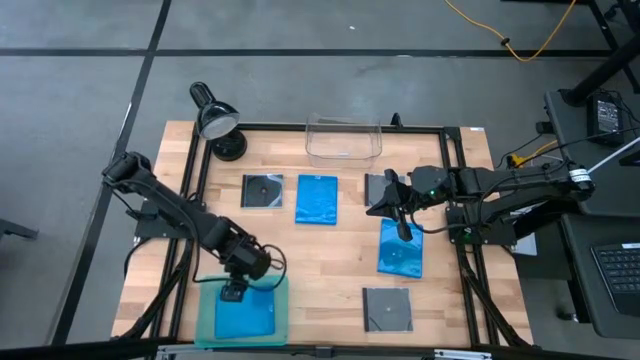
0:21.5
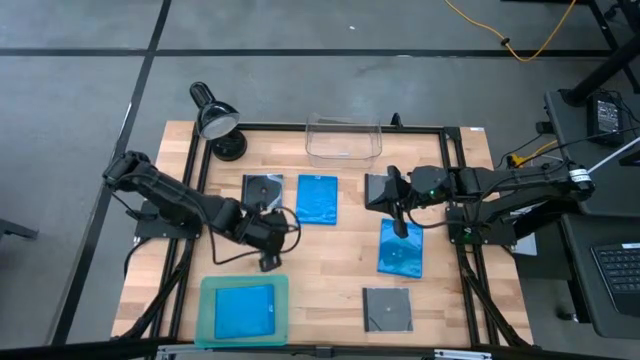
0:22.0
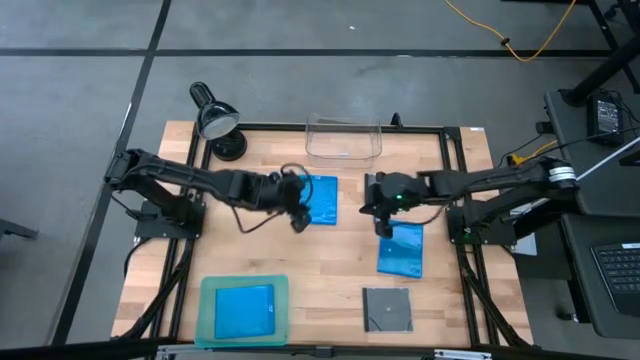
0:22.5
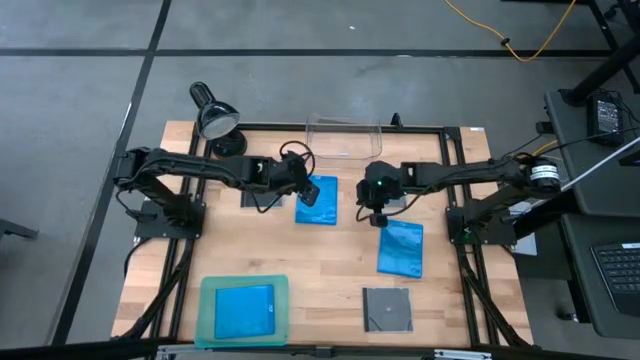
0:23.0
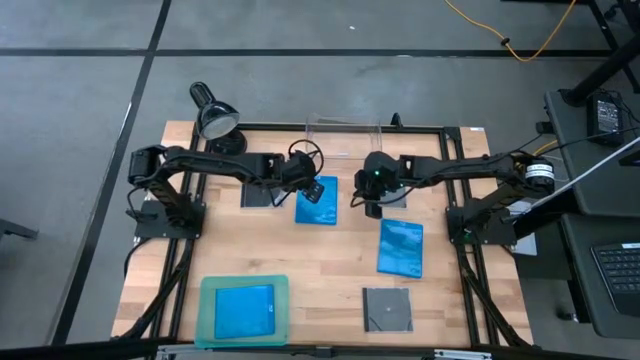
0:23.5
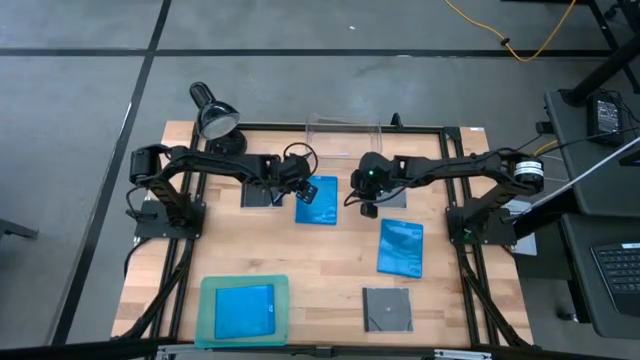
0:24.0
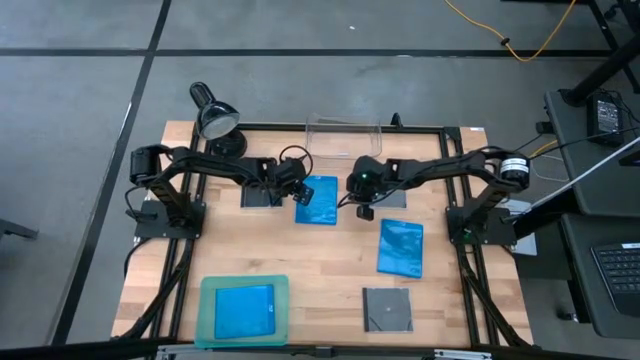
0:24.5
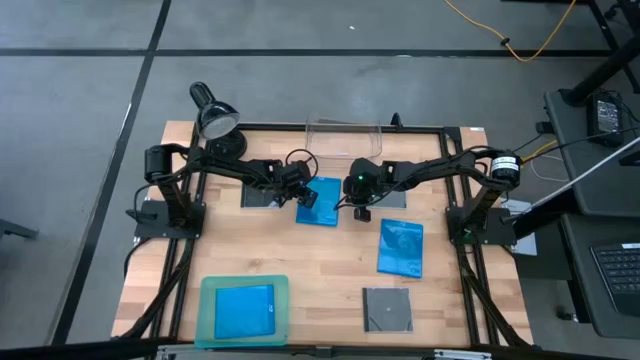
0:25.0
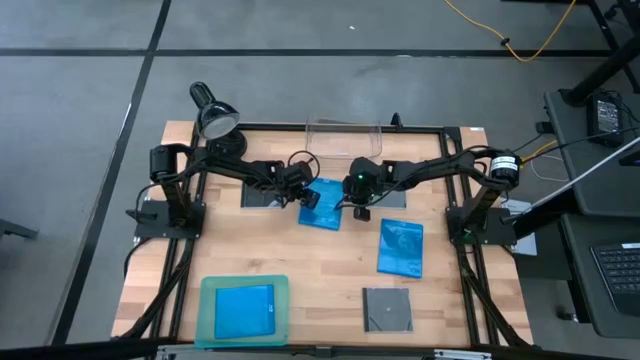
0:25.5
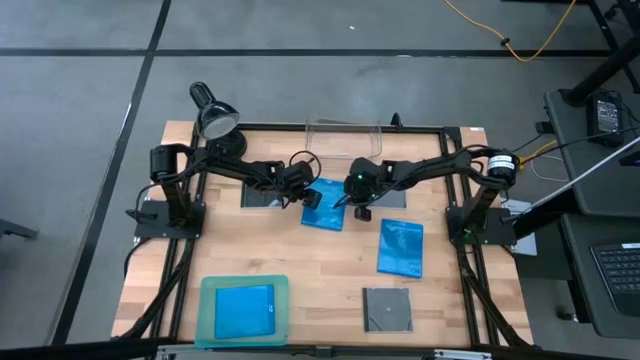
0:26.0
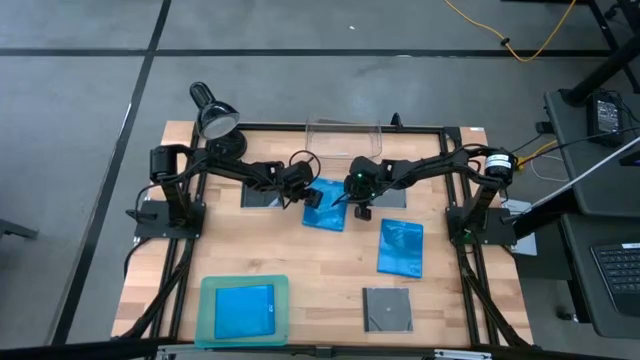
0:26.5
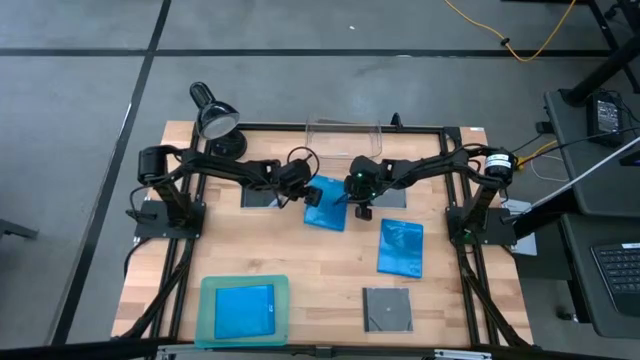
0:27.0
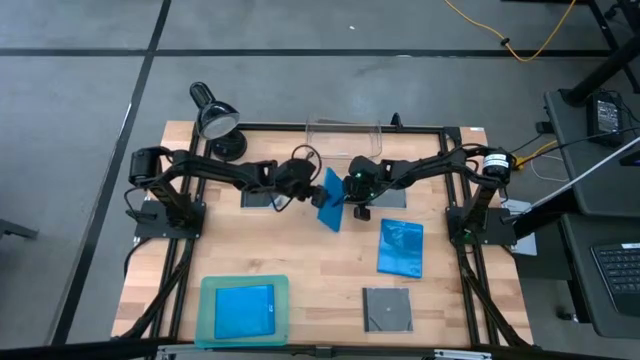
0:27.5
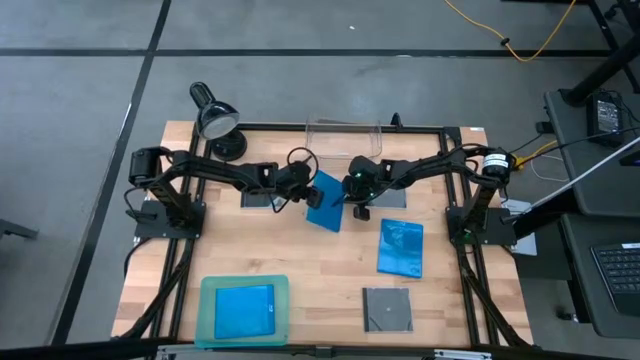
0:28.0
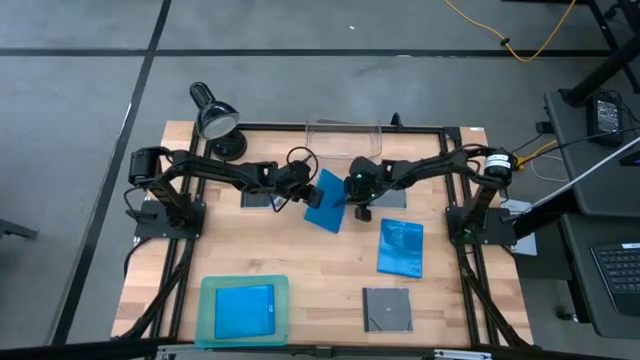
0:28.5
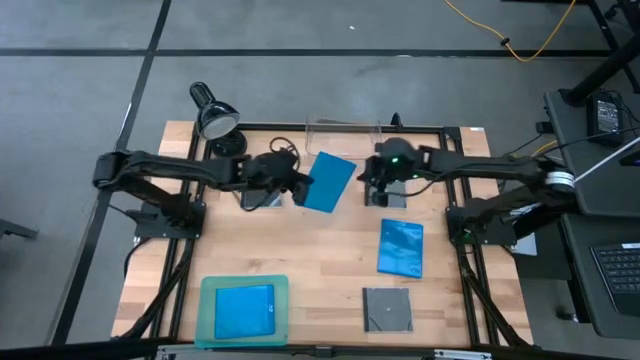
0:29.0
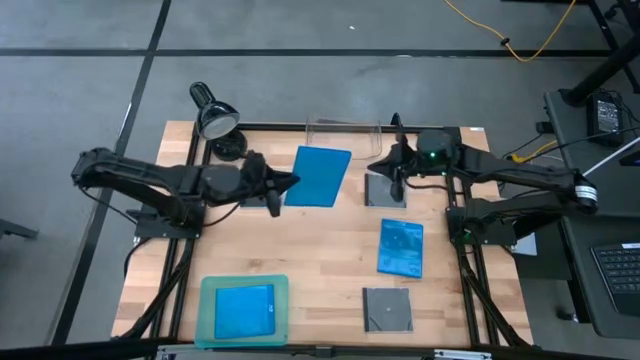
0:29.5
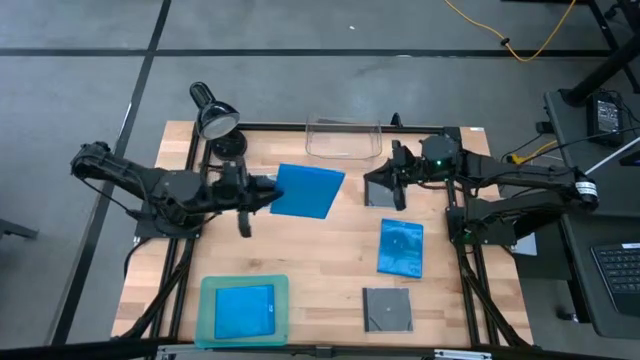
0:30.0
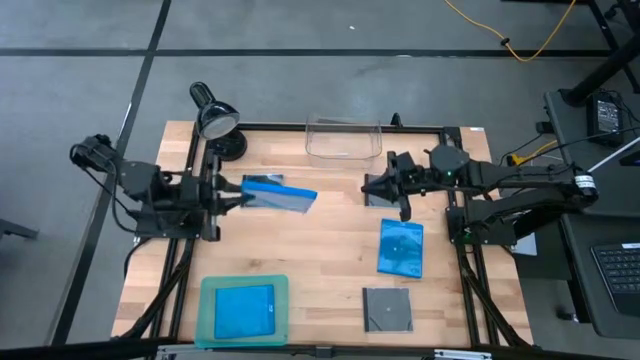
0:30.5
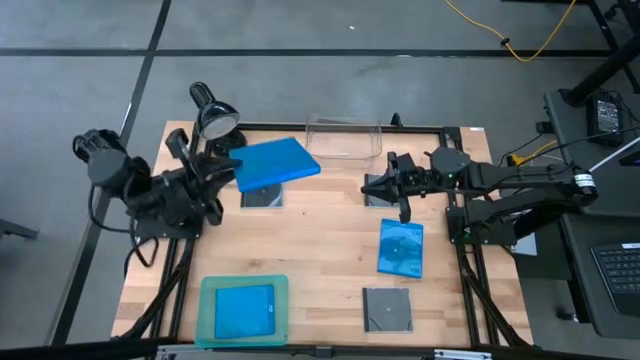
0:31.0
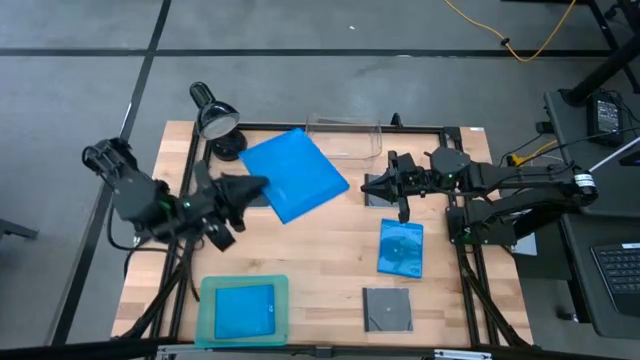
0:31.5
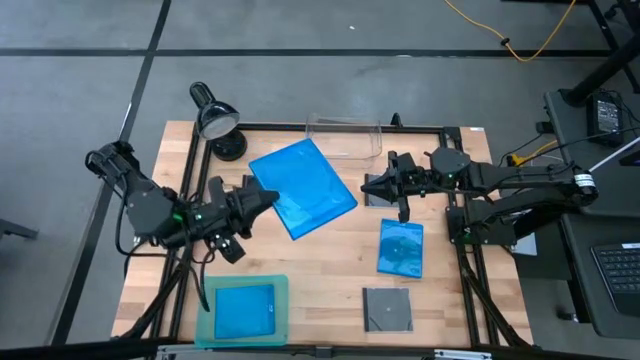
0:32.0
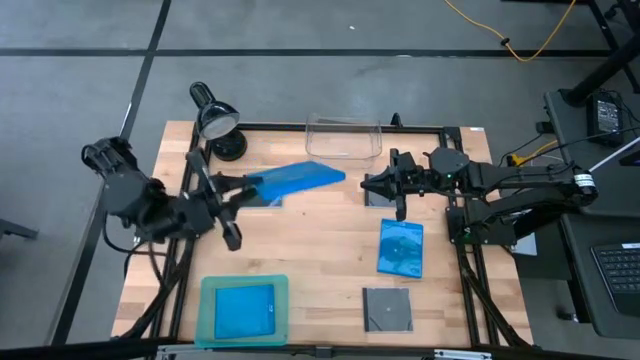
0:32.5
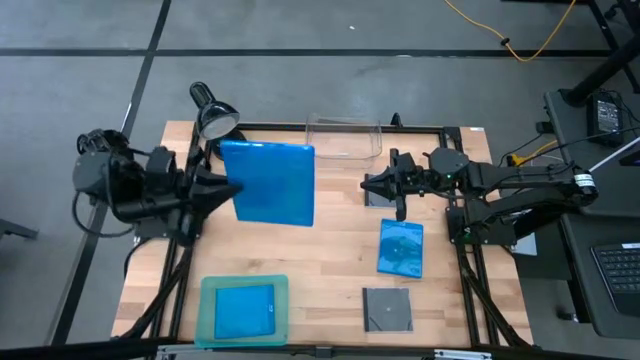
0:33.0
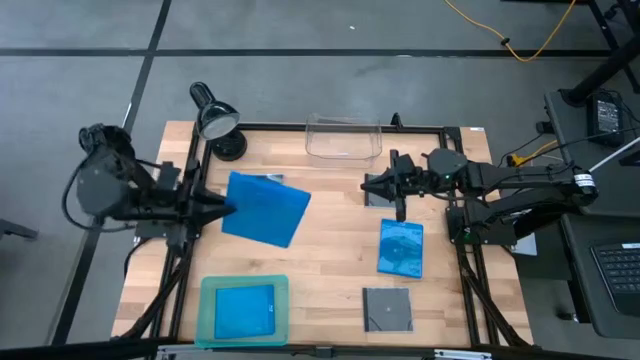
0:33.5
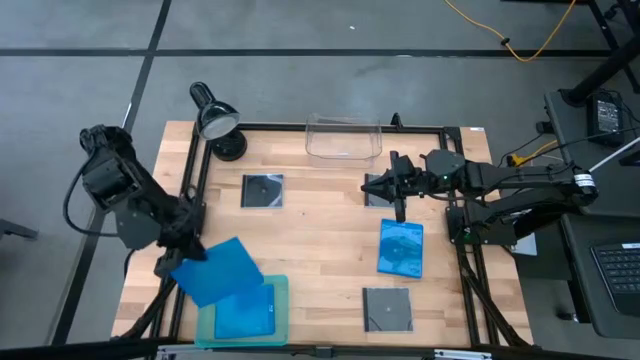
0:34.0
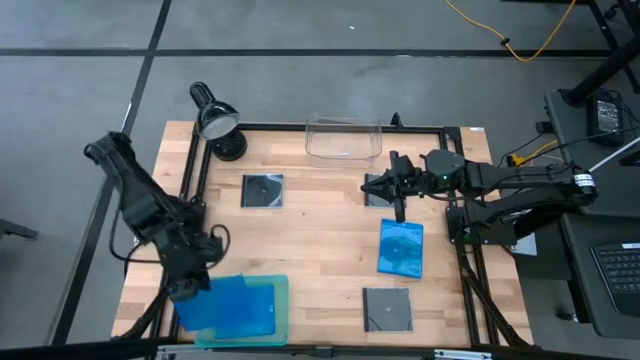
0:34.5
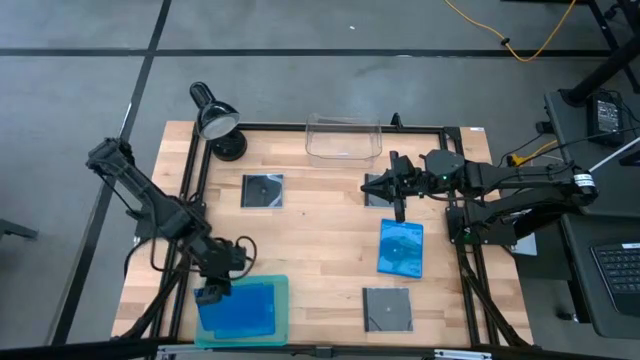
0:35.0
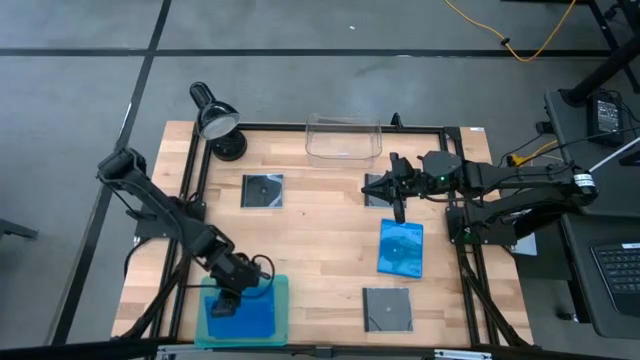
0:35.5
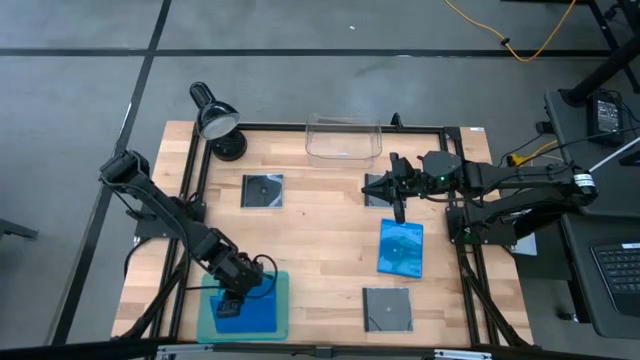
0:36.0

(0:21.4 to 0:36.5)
Task: Pick & place jewel cases by type
Put the top blue CD case into the blue bin

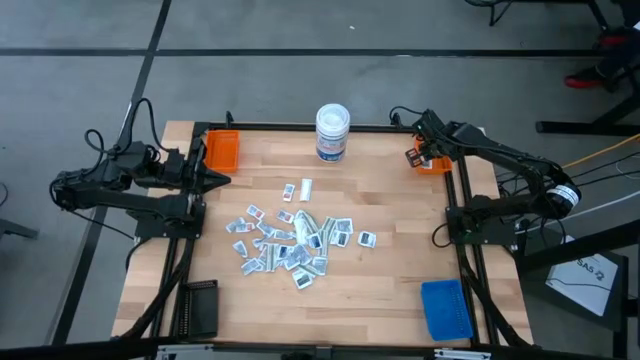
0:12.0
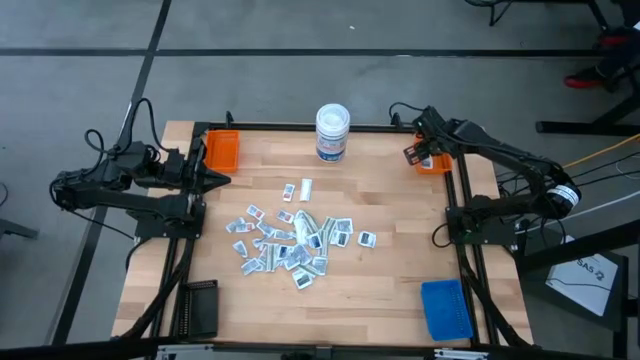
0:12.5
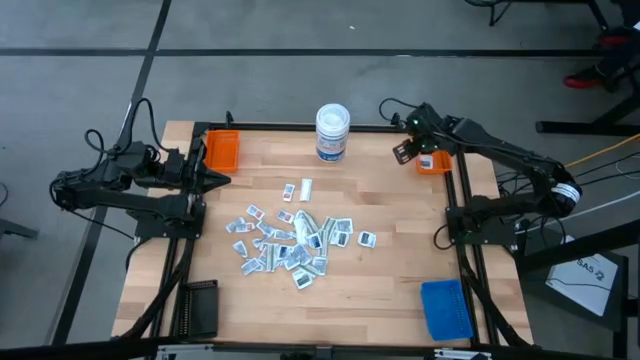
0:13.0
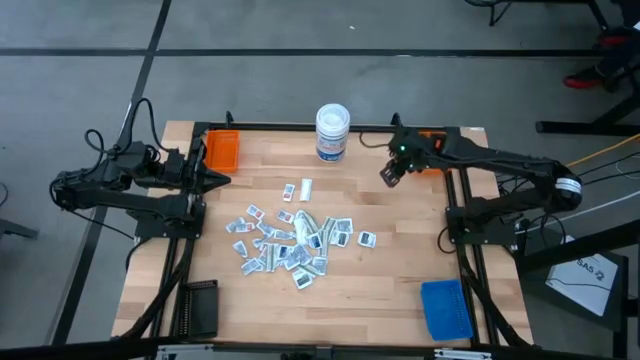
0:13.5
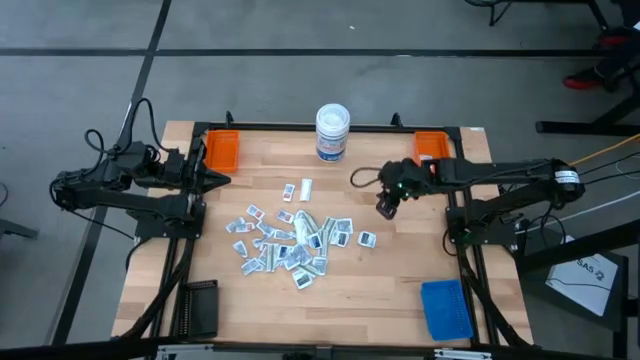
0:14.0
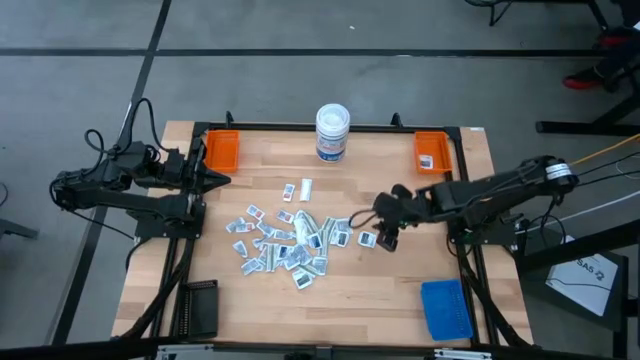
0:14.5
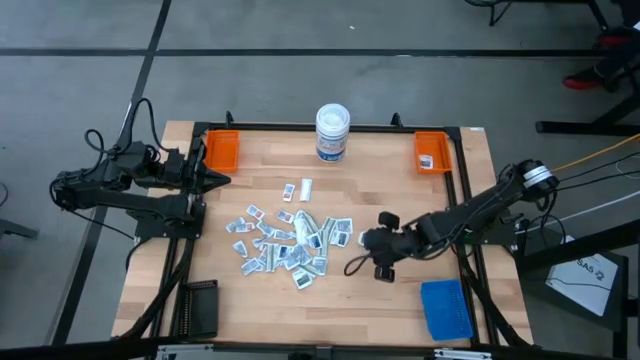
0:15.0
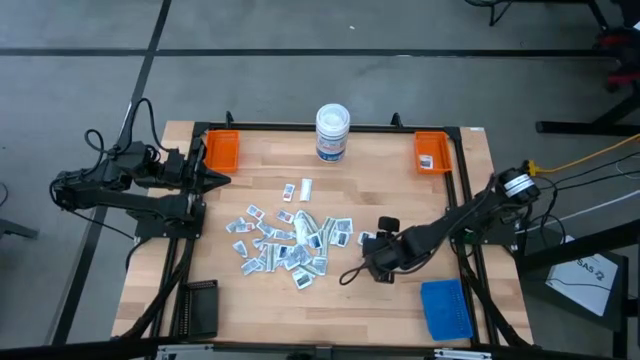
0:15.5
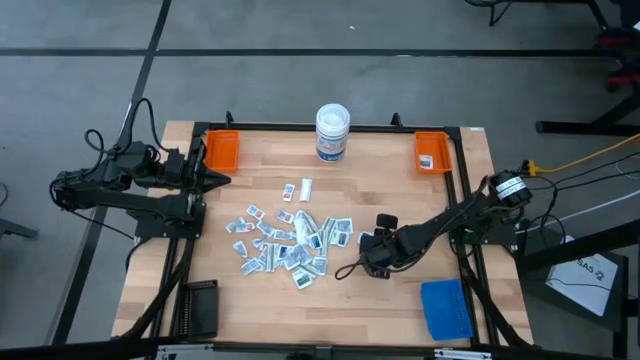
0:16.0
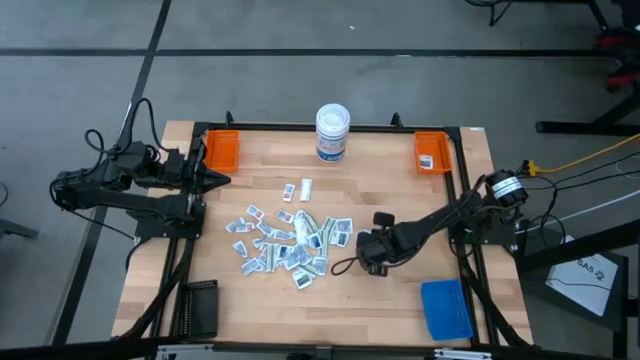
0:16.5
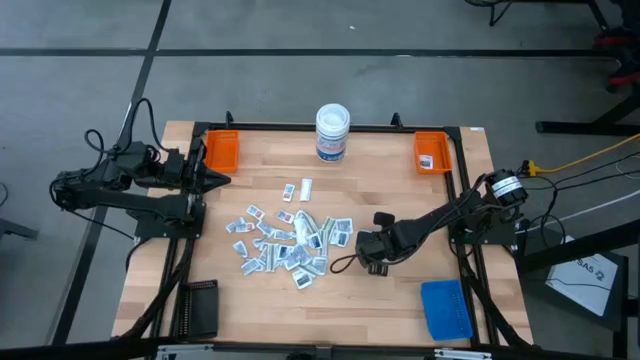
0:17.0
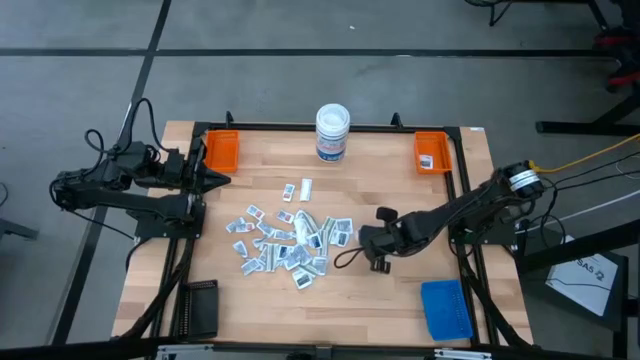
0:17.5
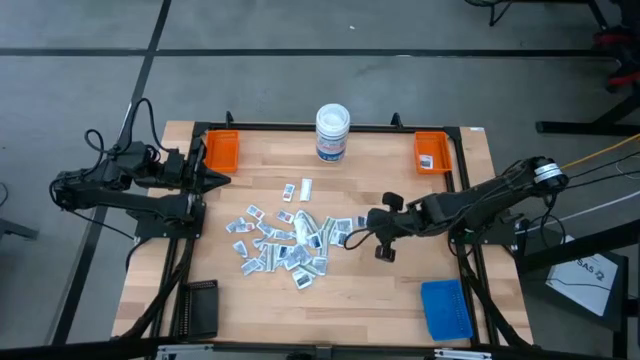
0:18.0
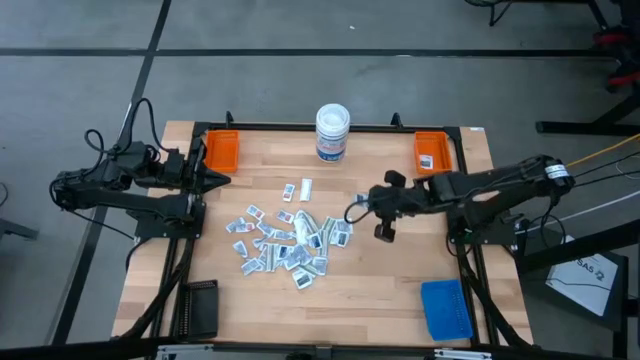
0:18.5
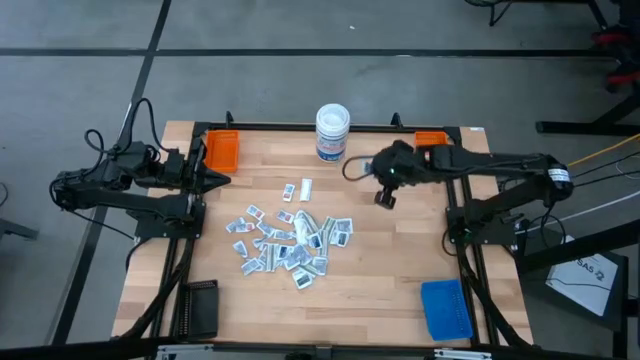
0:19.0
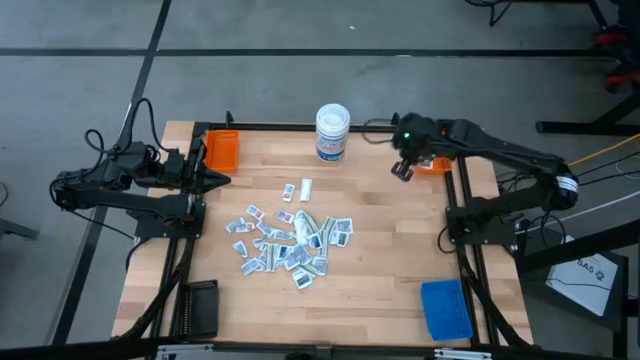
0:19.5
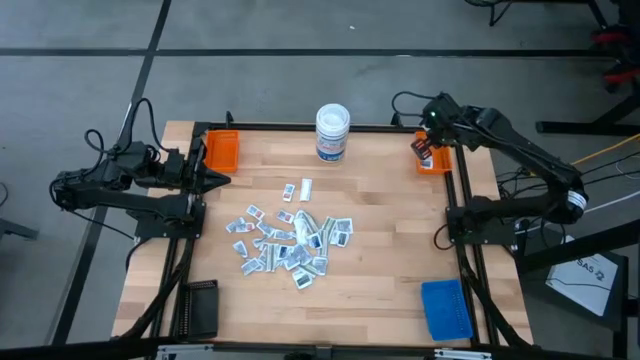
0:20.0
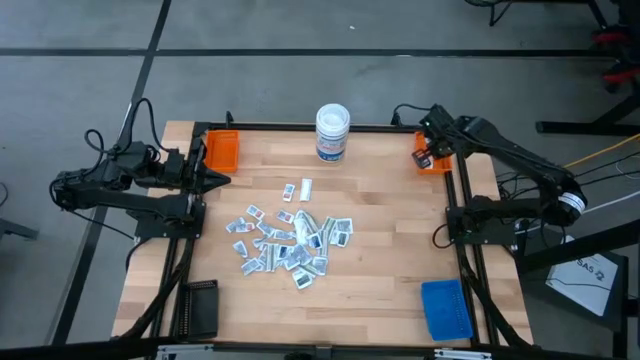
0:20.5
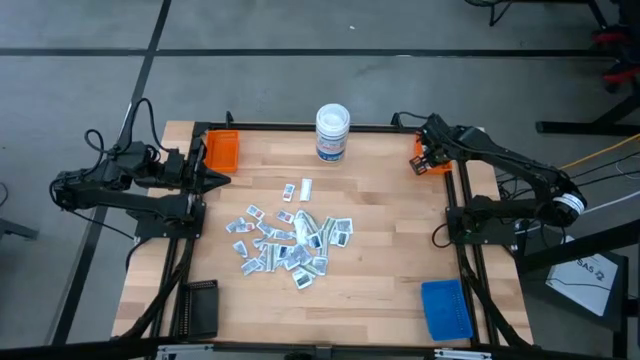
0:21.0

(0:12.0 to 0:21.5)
Task: Pick & Place First Aid Supplies
Put the gray towelette pack into the right orange bin
